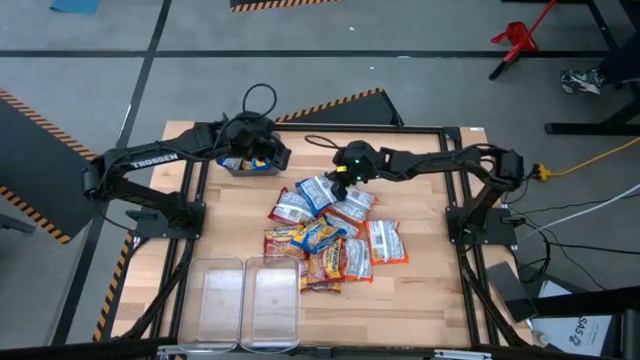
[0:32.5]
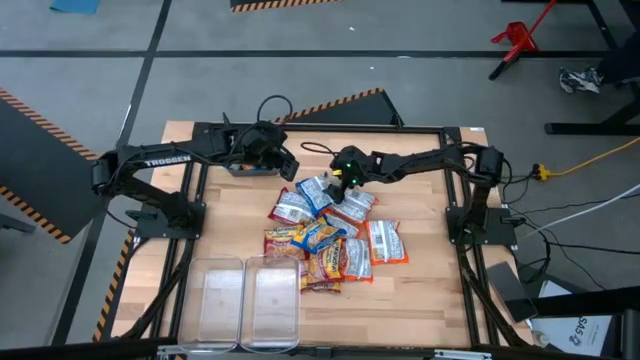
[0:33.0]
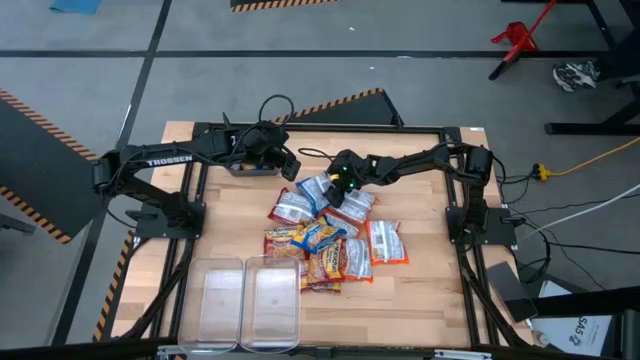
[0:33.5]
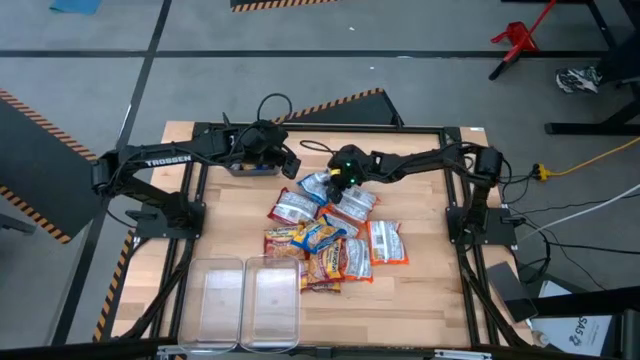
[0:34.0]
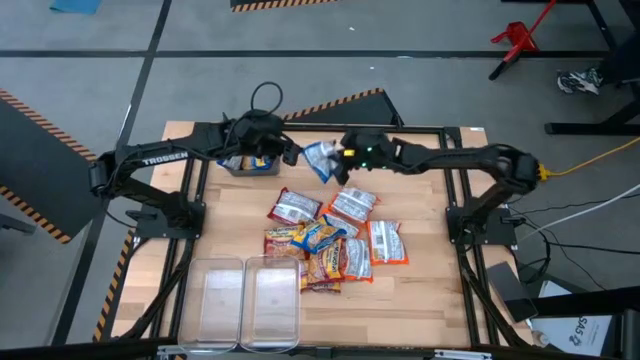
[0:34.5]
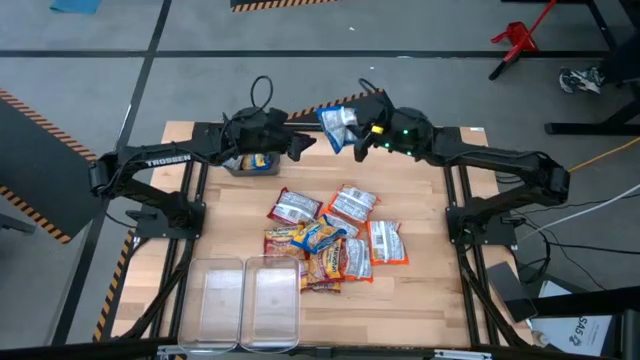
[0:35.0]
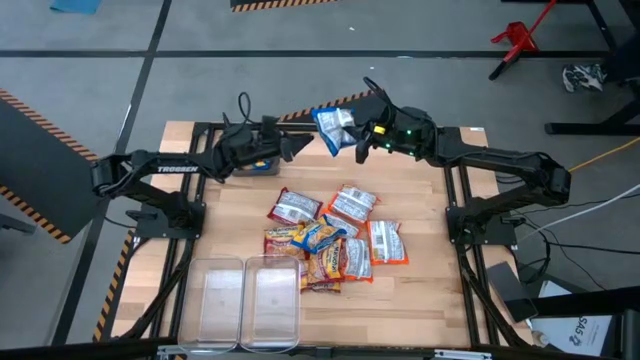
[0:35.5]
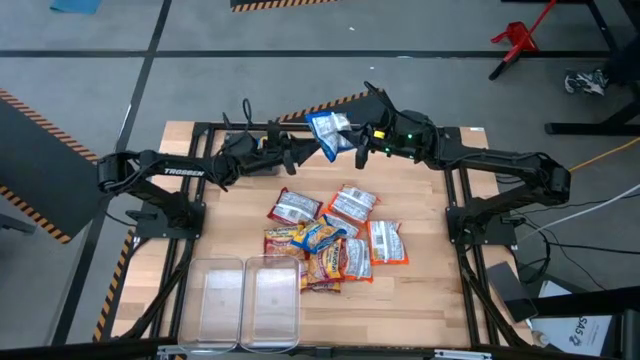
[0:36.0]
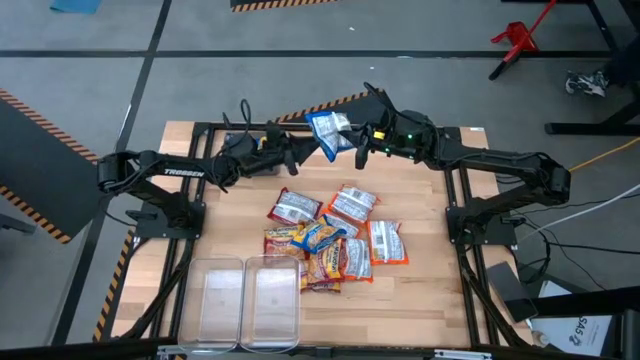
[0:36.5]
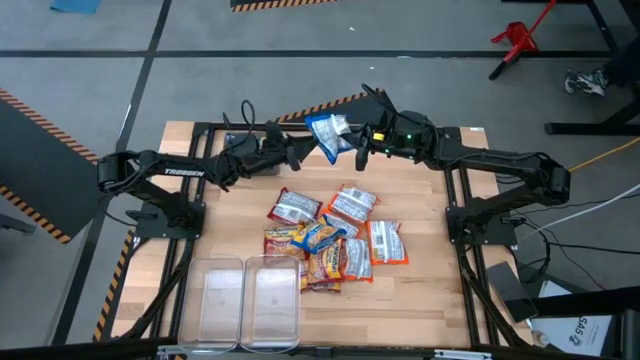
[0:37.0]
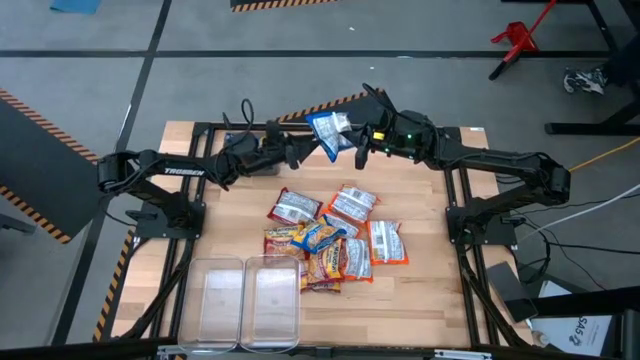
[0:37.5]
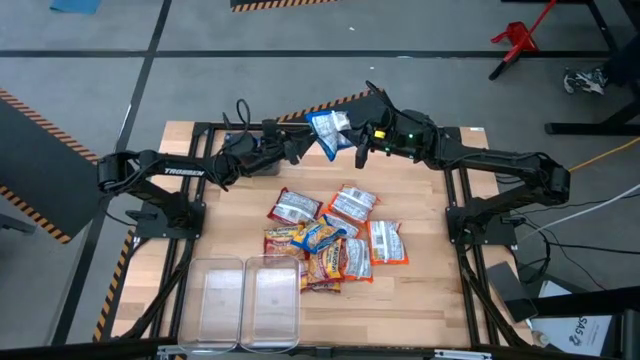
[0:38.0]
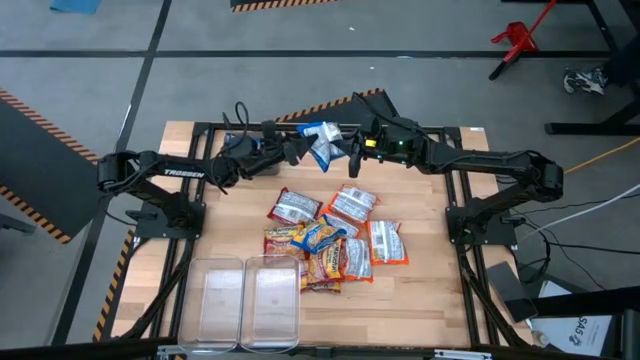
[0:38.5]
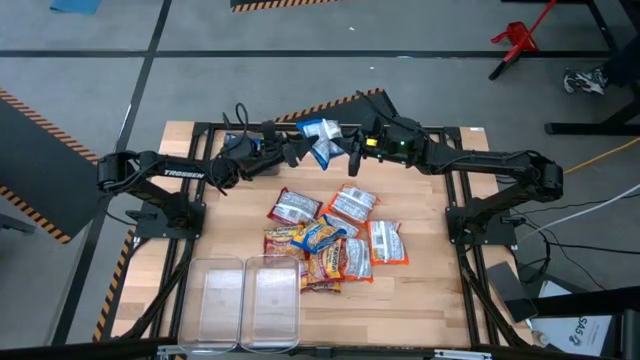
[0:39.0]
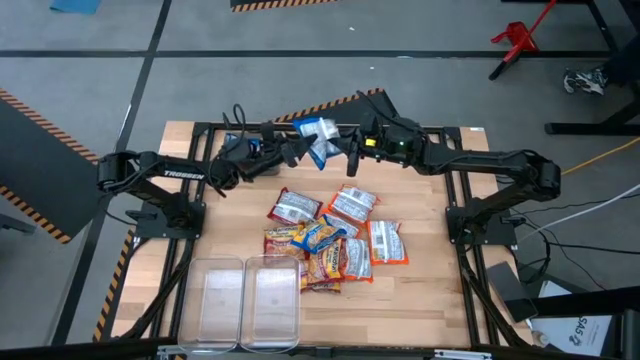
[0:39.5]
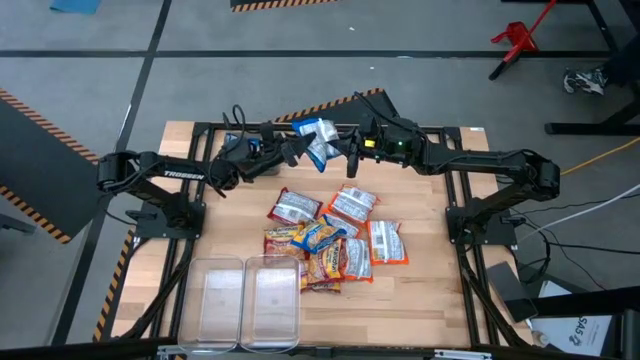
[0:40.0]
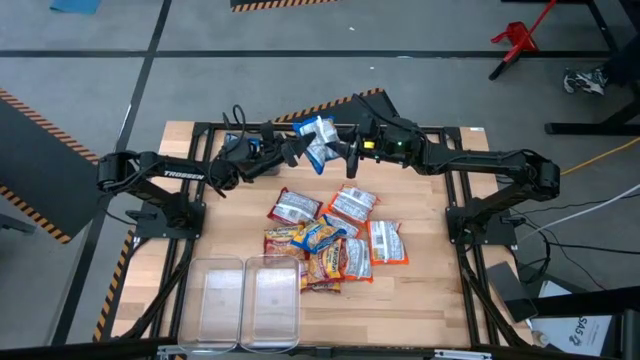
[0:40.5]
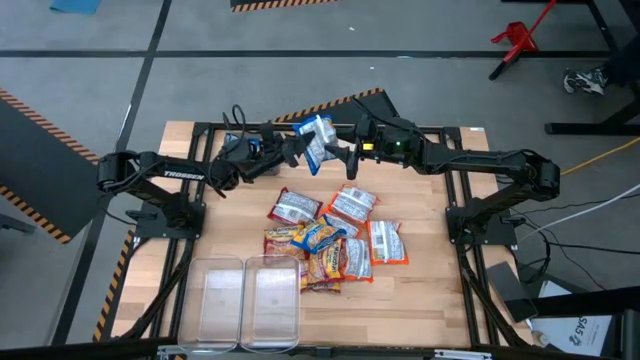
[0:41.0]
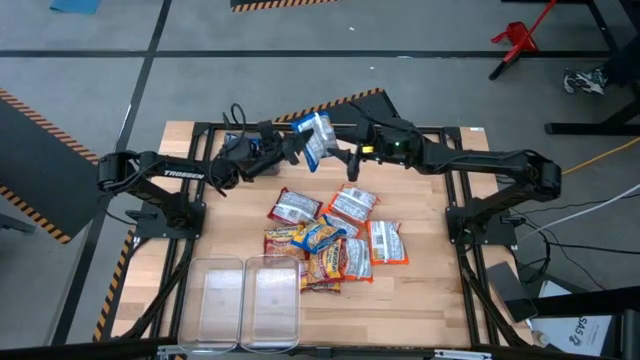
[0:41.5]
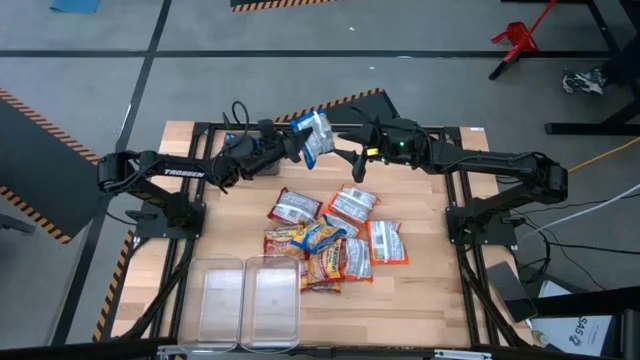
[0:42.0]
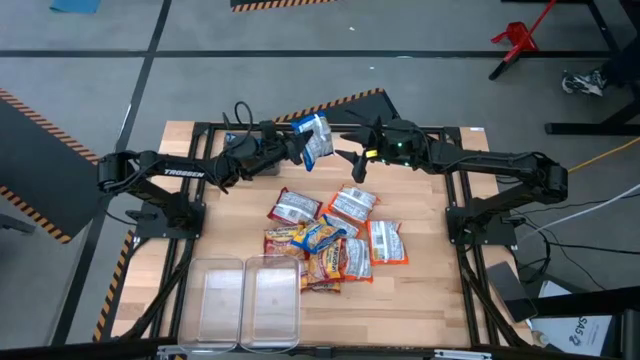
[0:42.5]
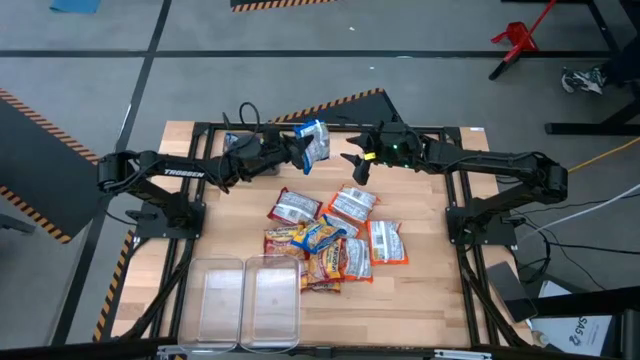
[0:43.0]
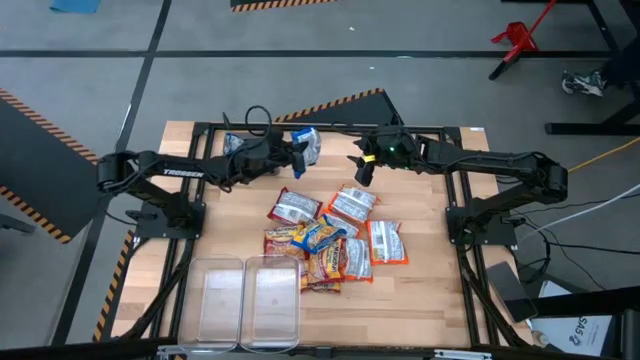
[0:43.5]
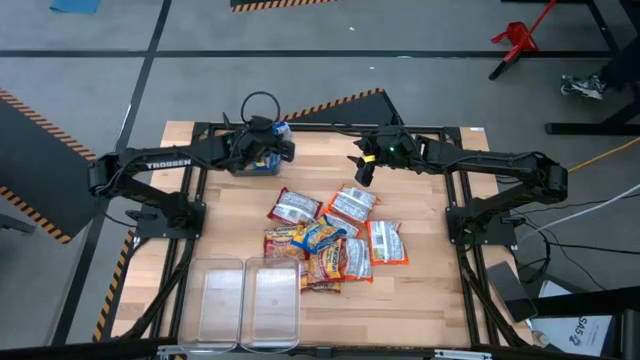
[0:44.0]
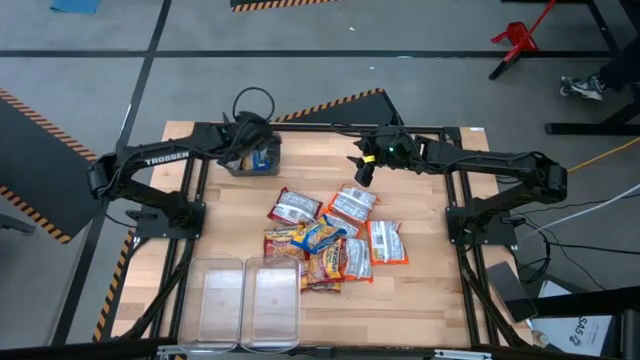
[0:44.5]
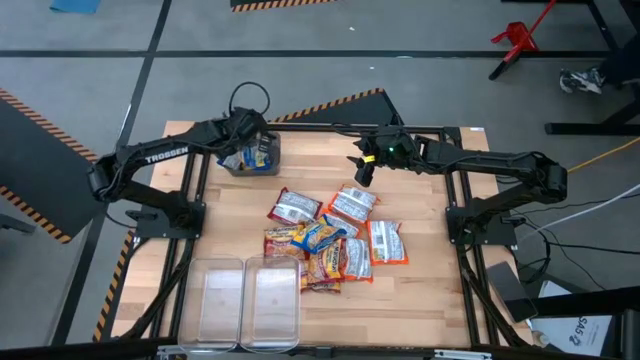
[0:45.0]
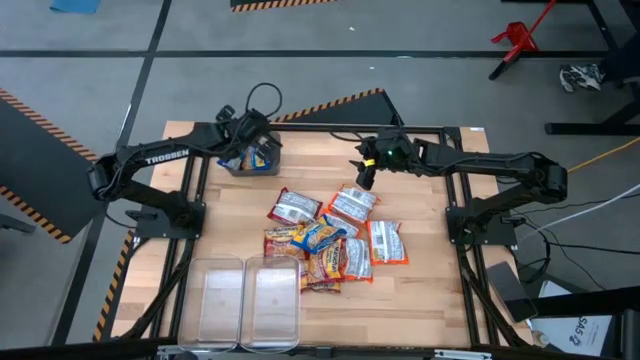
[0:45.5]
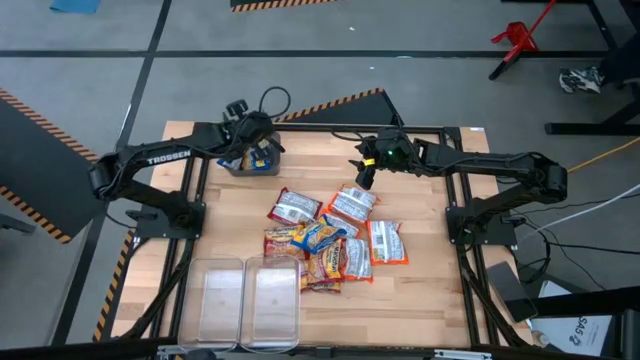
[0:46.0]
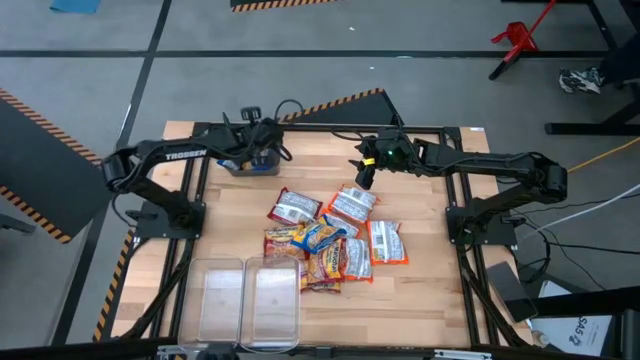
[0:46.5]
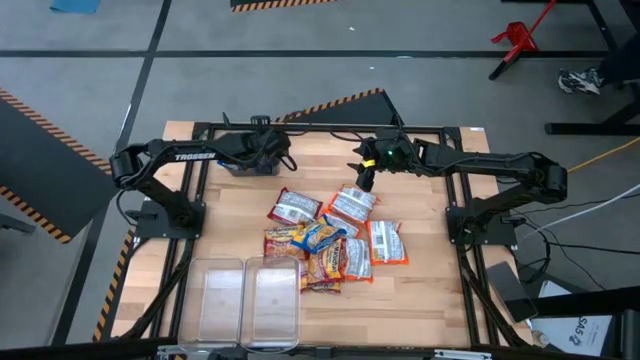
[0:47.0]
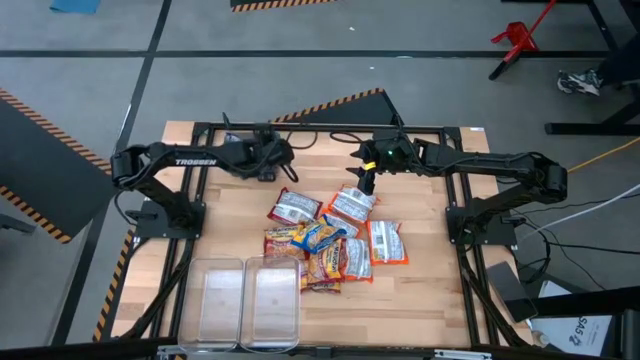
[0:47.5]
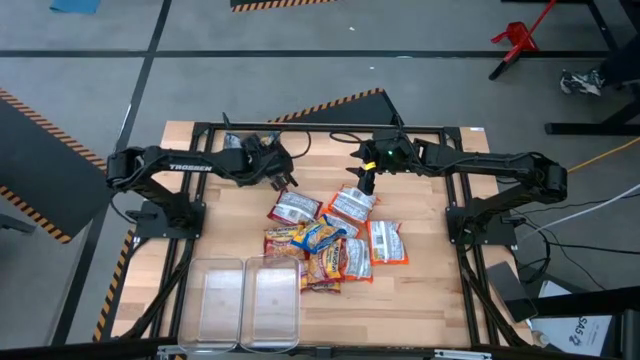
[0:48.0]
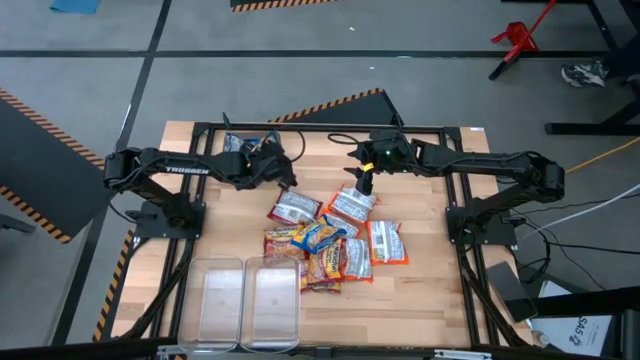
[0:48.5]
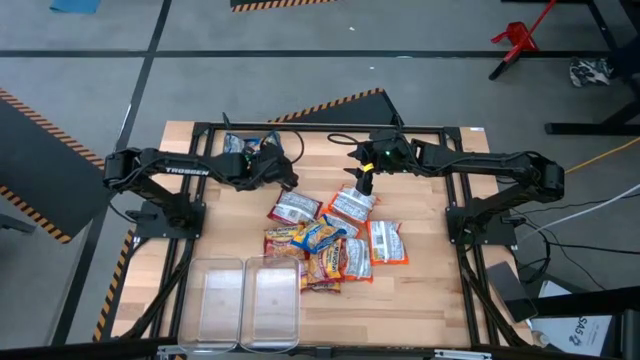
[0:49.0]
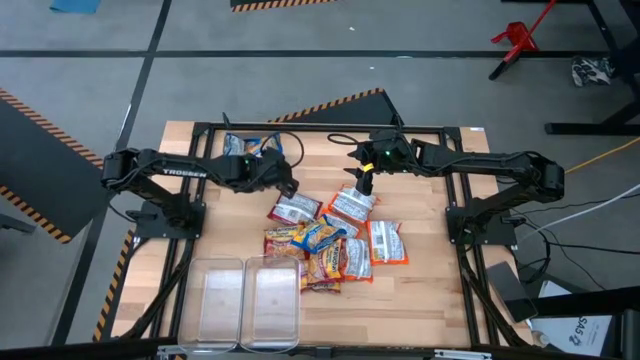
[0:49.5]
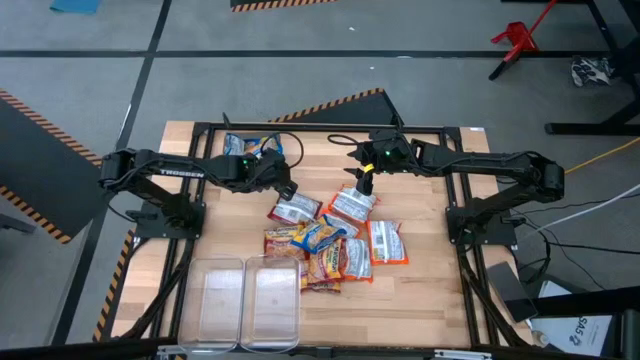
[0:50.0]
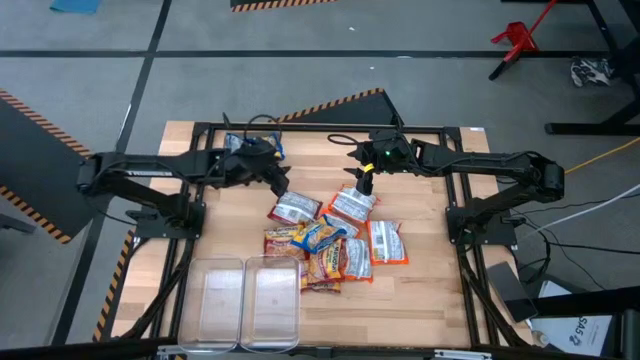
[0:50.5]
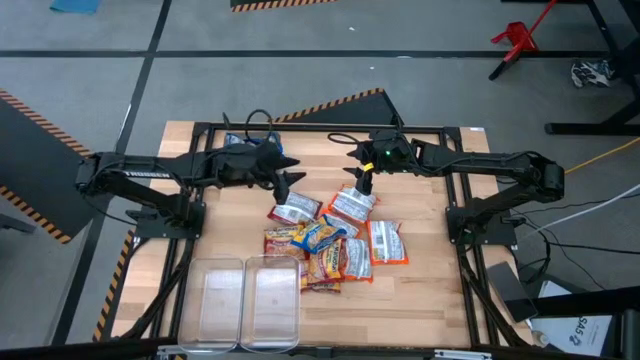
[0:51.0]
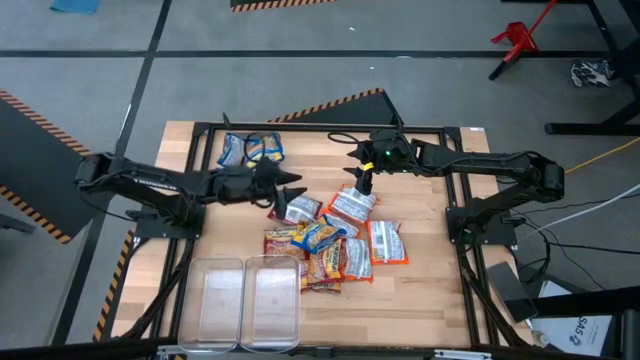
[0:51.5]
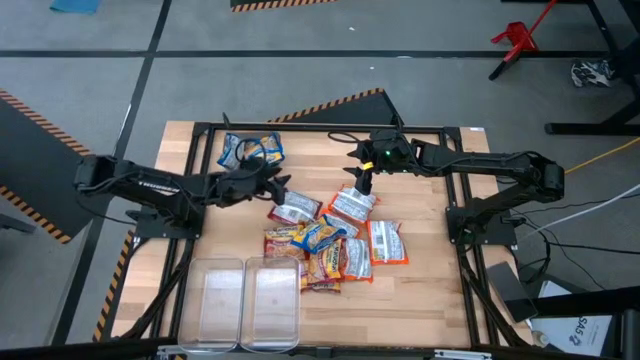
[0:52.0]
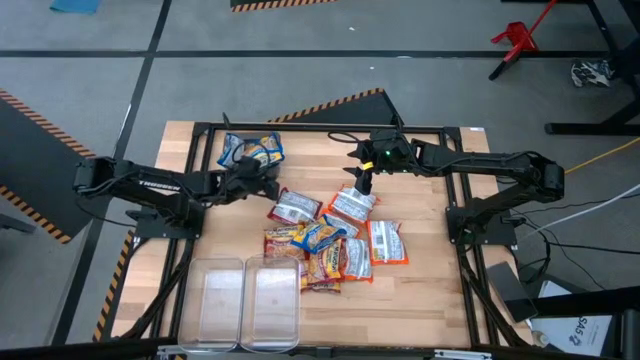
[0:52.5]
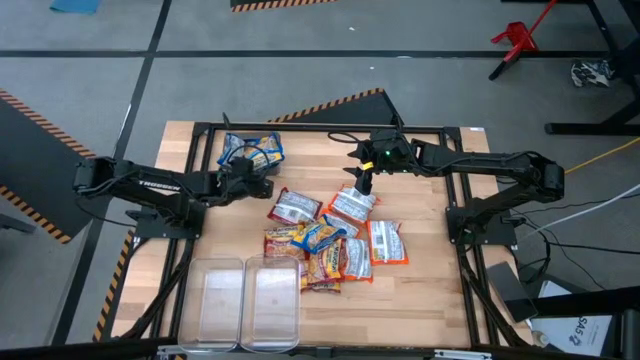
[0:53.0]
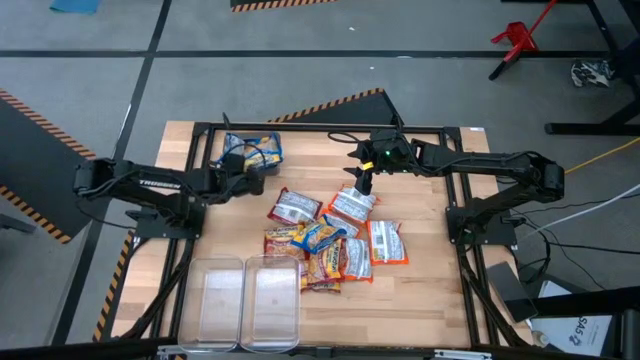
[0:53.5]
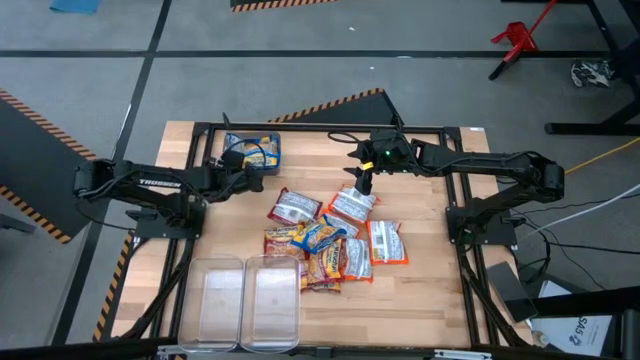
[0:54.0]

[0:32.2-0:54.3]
Task: Sort Maruchan noodles
Put the blue noodle pack into the black bin
